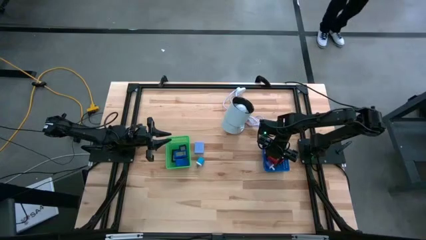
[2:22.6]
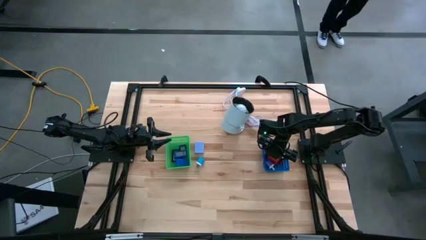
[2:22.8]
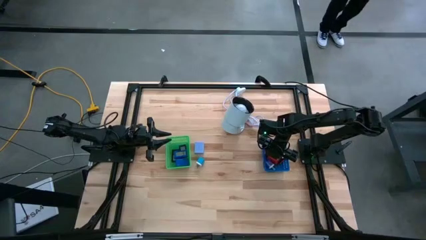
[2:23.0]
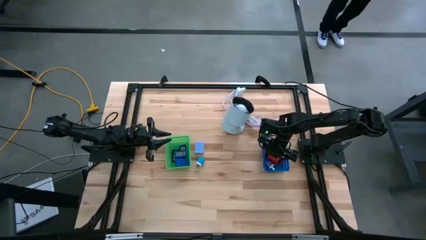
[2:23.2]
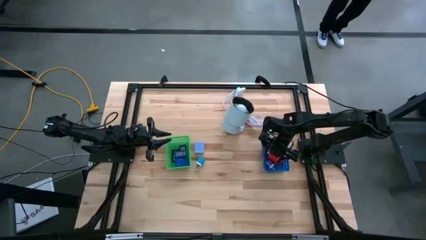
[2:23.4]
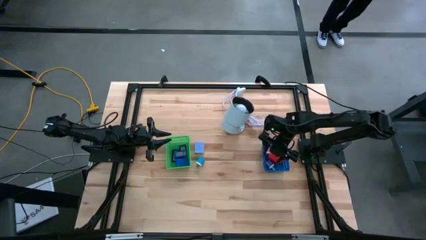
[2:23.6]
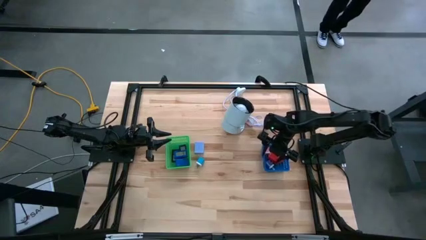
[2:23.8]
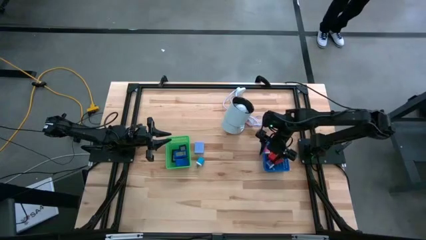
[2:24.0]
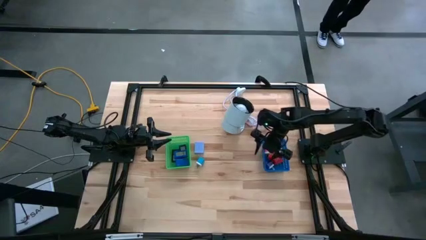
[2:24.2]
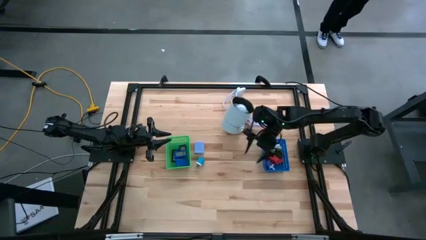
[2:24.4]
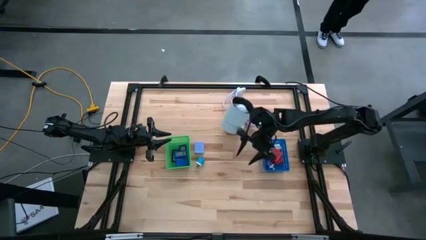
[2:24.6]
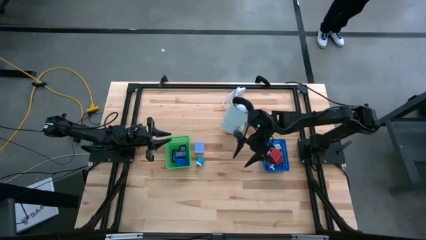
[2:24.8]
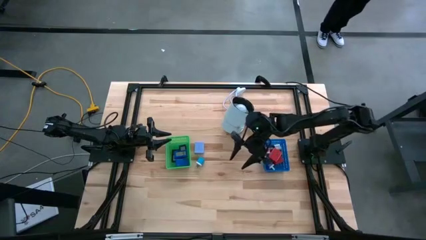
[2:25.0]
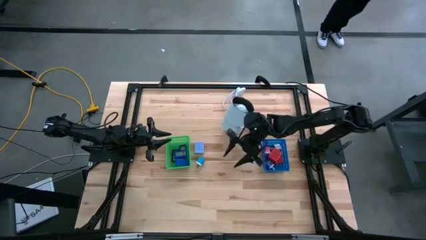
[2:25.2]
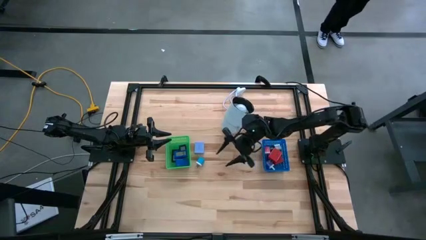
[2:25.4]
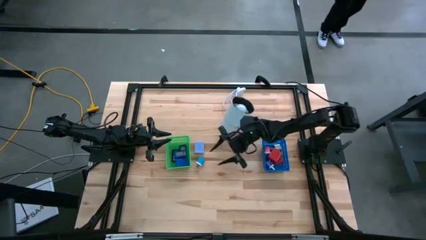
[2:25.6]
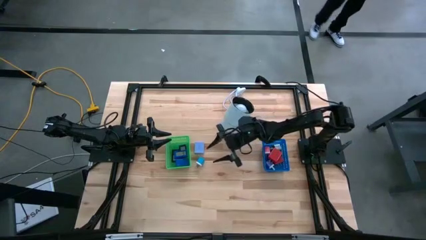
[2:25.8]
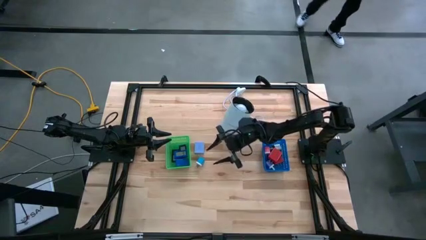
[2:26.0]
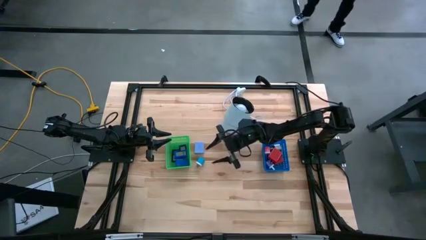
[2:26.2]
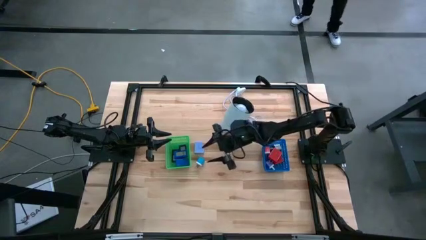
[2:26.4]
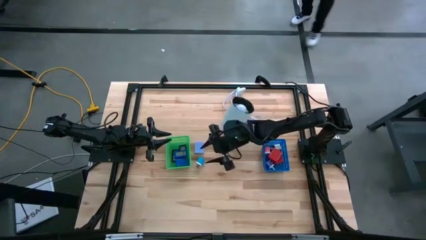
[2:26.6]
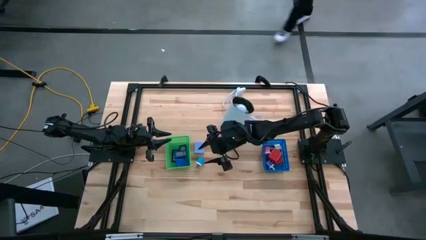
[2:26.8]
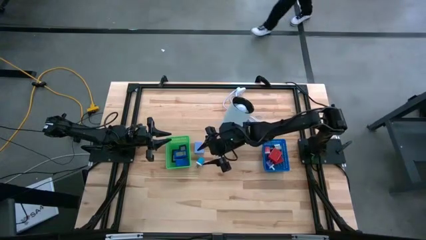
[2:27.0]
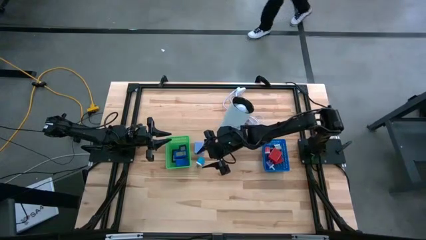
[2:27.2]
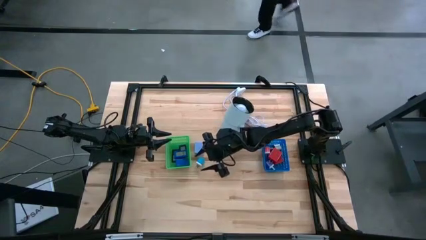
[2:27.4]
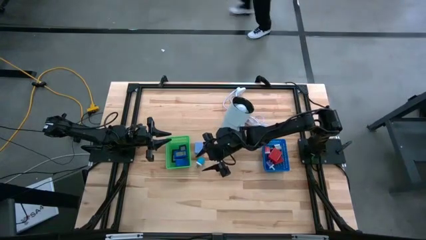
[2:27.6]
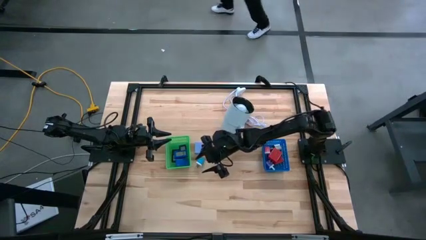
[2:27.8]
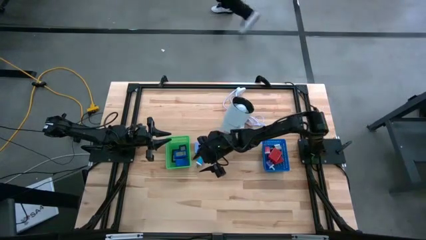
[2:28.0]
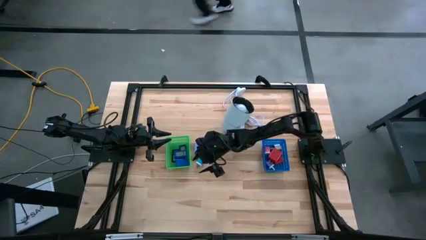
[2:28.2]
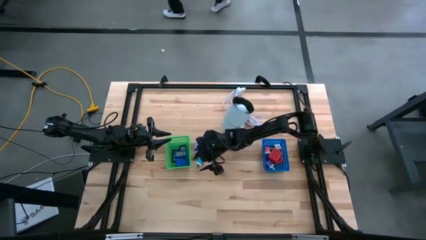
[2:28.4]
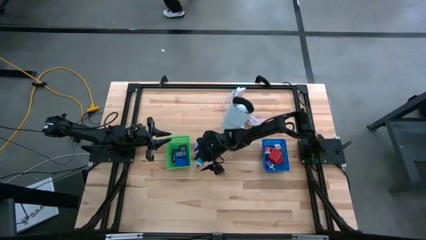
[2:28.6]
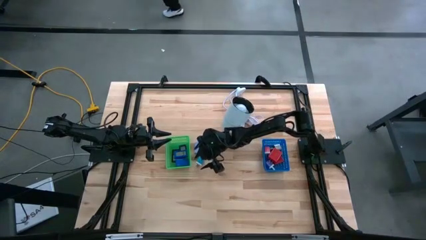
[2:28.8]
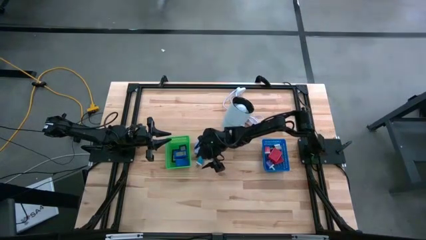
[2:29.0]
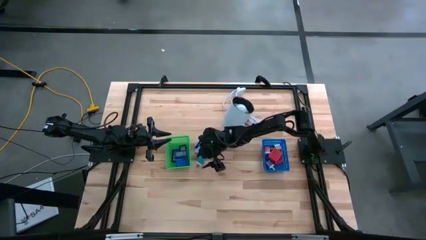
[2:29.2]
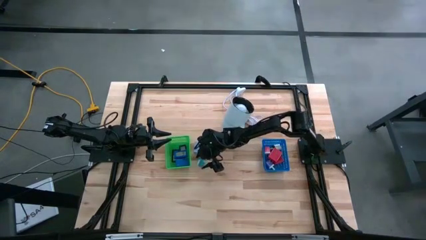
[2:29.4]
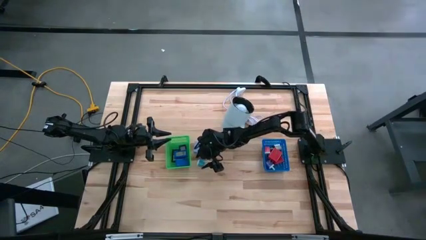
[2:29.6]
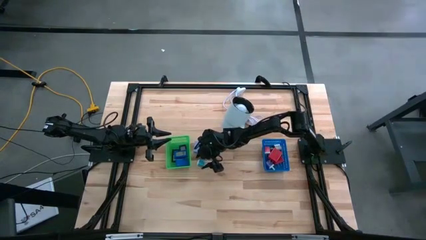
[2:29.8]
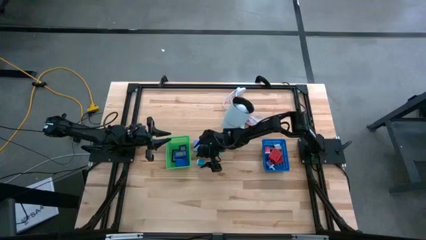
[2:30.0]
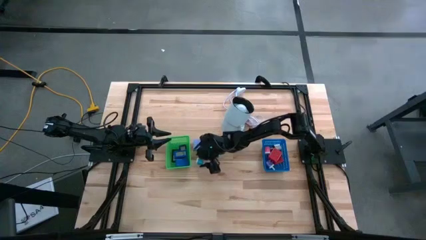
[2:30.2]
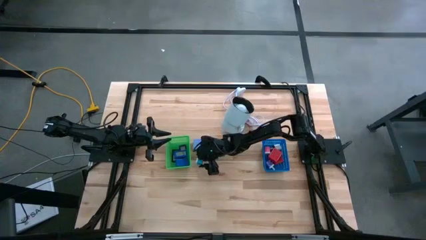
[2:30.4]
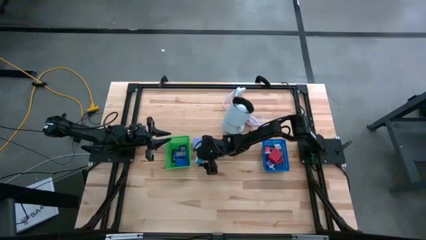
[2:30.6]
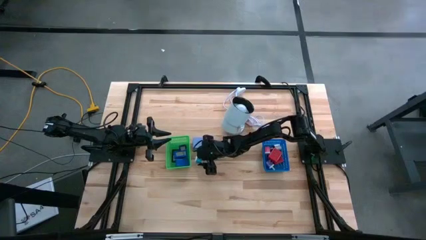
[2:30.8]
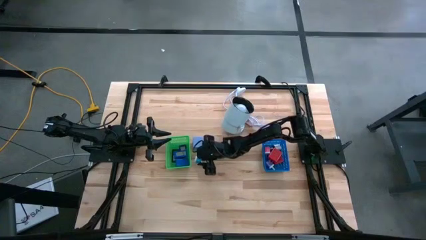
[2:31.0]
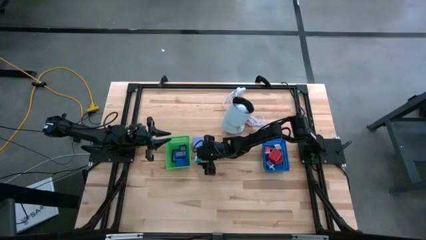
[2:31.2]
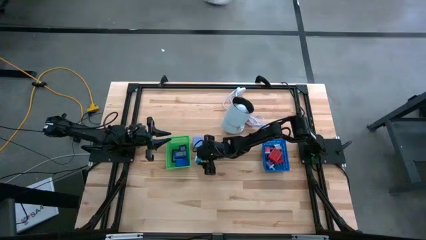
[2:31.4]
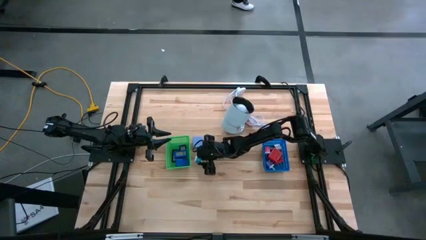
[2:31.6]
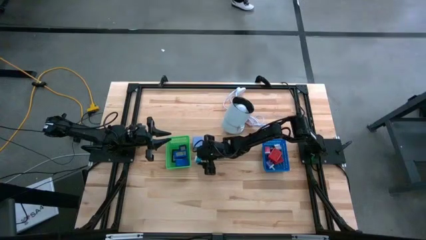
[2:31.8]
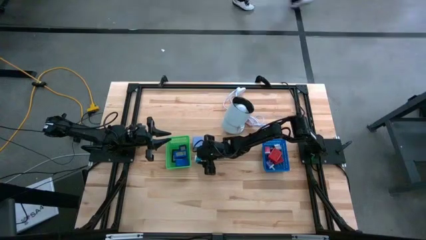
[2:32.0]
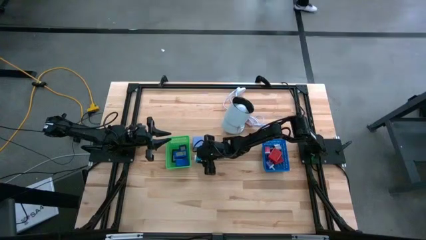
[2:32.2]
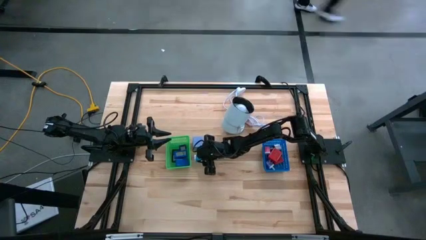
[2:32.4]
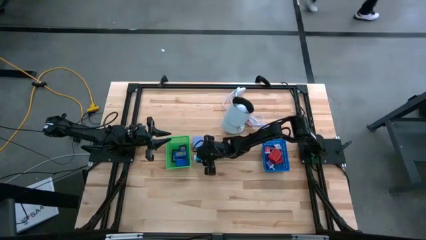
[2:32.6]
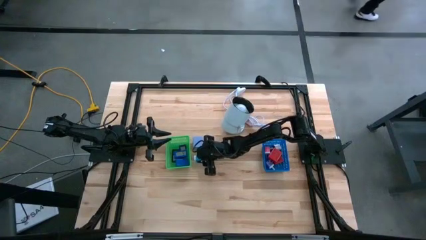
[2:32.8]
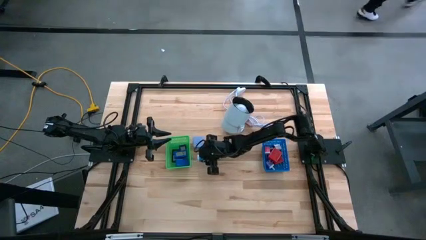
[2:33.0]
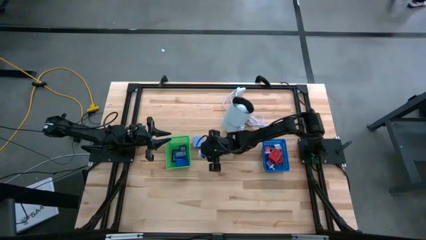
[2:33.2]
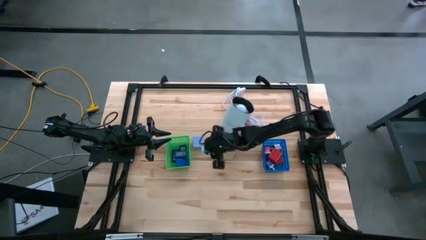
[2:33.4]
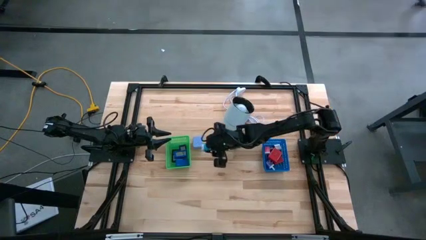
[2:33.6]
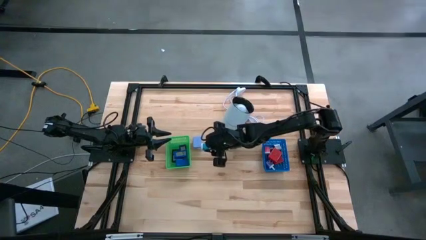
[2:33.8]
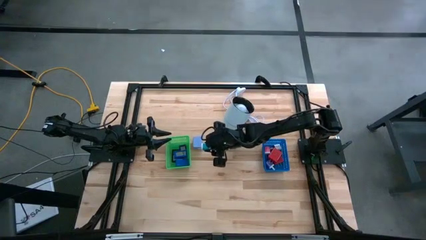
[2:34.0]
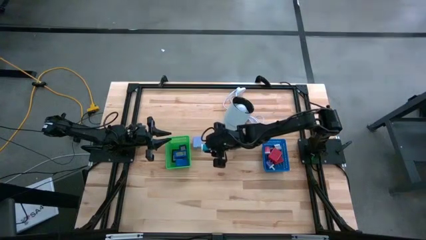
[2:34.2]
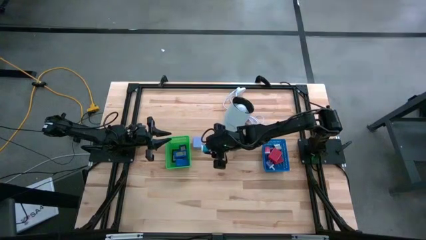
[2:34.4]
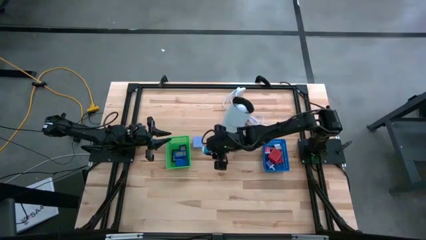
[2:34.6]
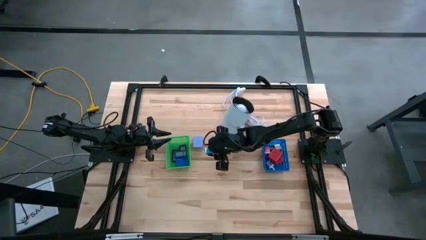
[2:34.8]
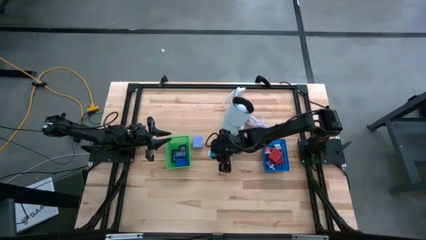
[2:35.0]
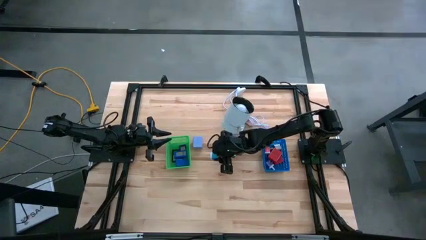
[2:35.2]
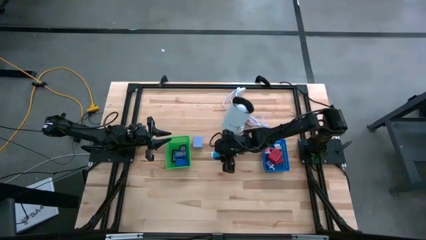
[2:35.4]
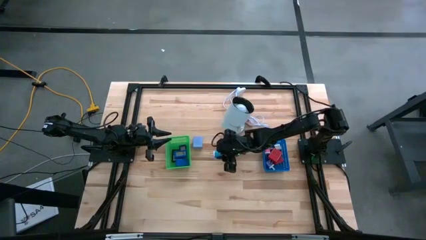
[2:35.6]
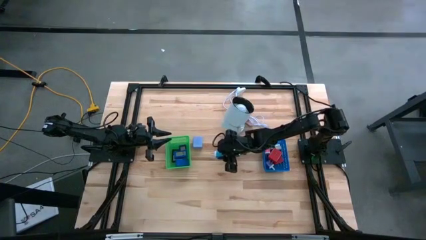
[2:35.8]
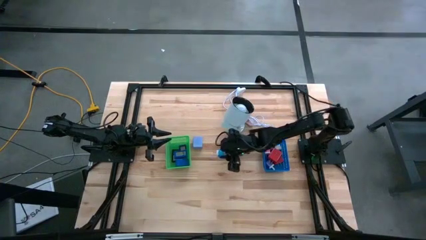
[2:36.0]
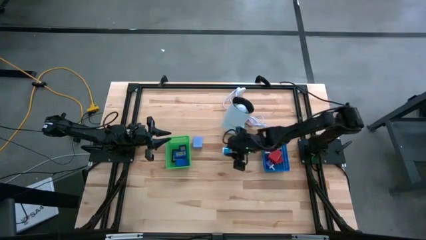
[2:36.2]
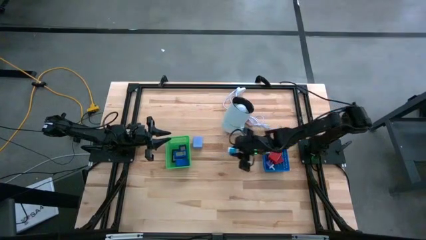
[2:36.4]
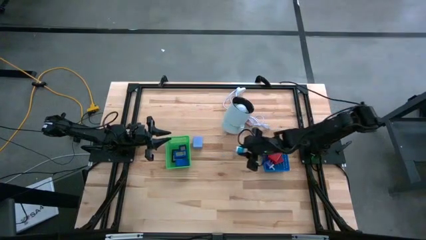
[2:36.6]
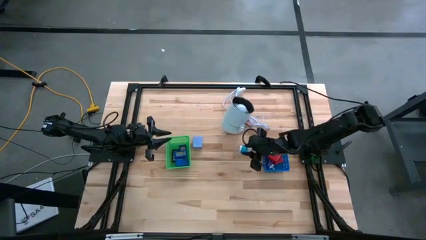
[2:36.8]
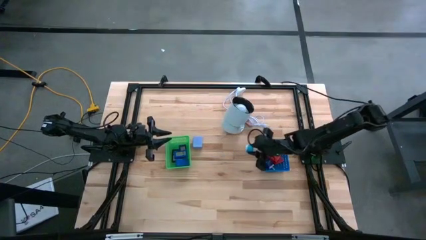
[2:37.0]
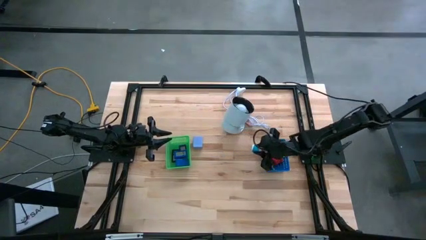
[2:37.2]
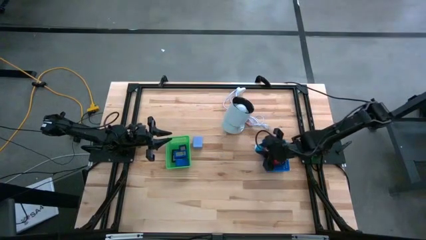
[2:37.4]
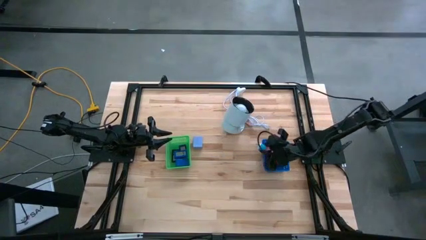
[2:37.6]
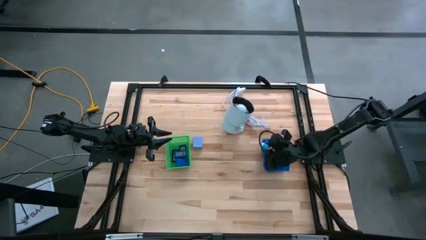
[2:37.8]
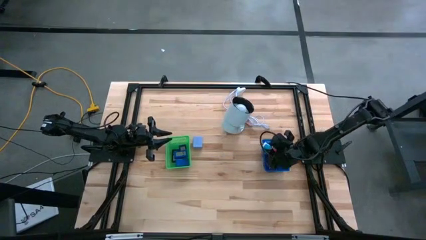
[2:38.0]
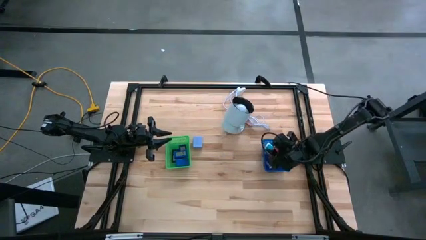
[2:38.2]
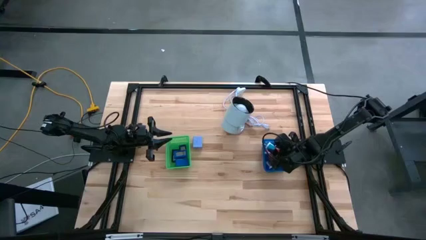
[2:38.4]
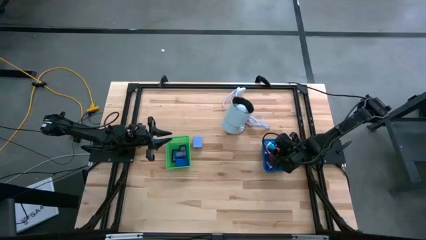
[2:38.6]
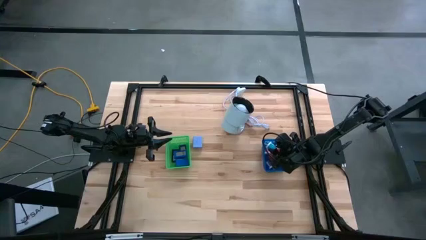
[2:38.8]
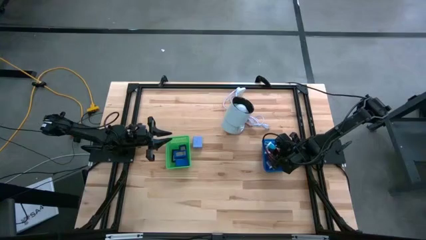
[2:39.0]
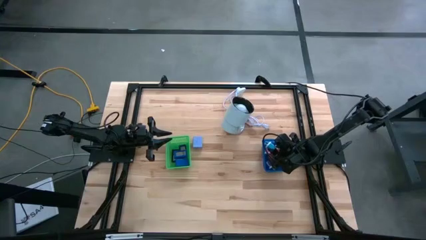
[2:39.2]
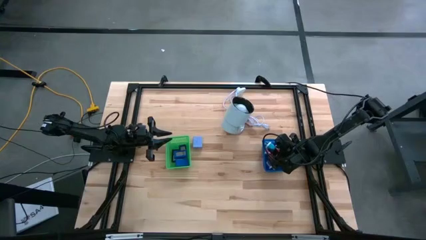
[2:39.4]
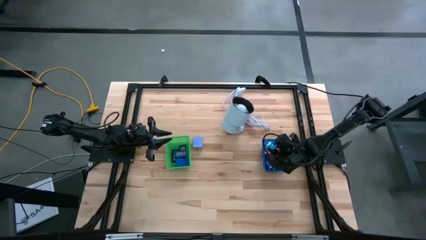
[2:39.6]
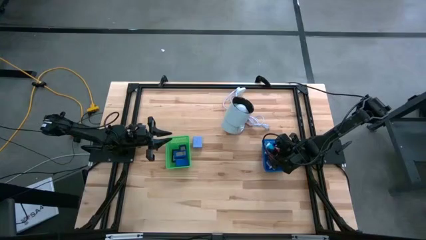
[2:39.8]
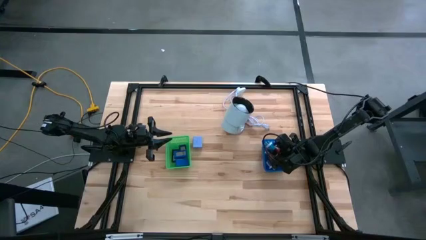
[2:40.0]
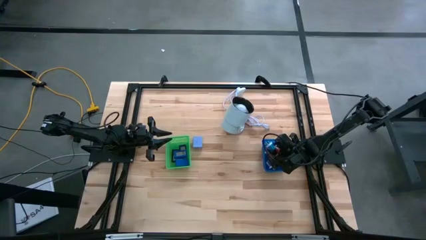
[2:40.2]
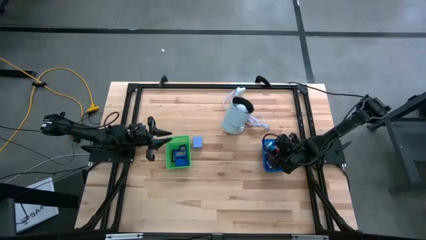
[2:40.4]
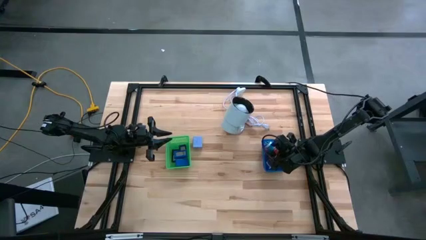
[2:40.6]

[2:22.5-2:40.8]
Task: Pick & Place Office items
Put the blue charger adapter into the blue bin
